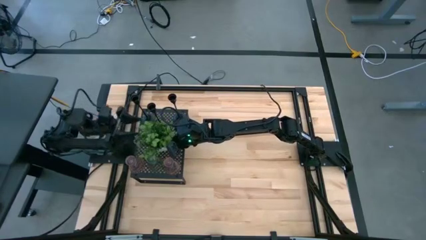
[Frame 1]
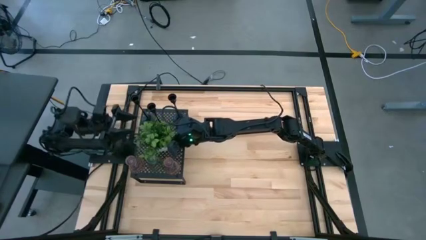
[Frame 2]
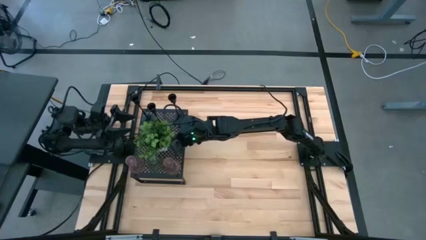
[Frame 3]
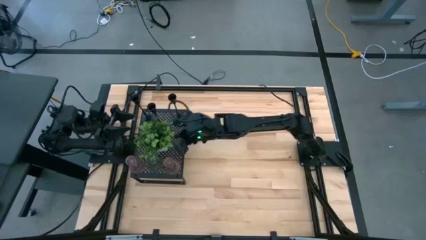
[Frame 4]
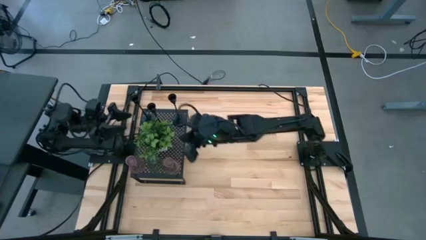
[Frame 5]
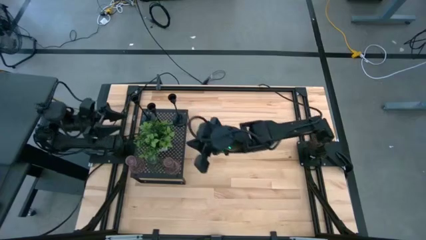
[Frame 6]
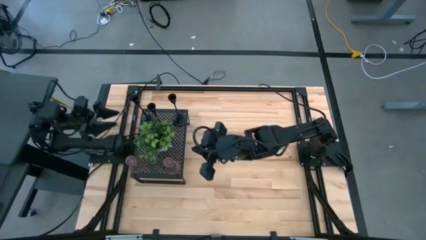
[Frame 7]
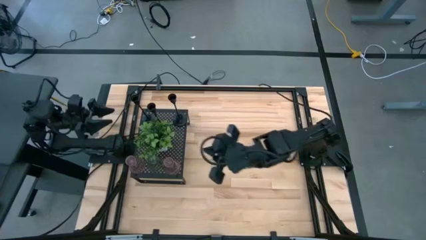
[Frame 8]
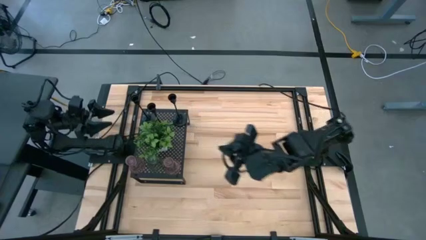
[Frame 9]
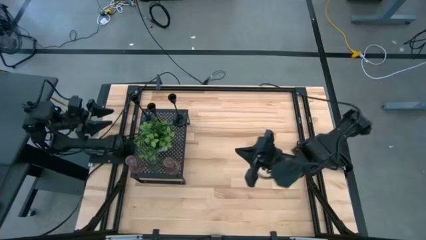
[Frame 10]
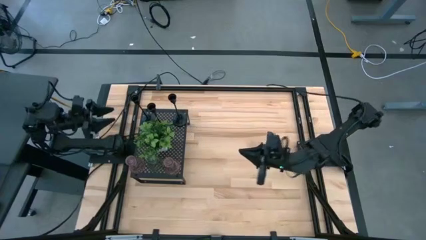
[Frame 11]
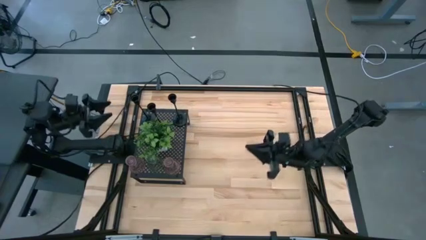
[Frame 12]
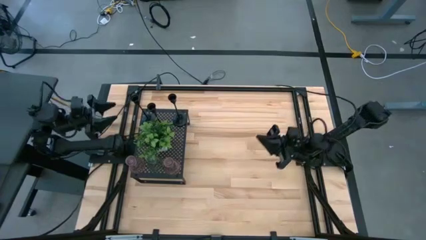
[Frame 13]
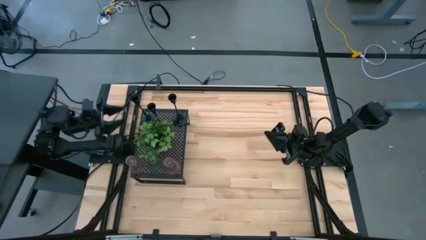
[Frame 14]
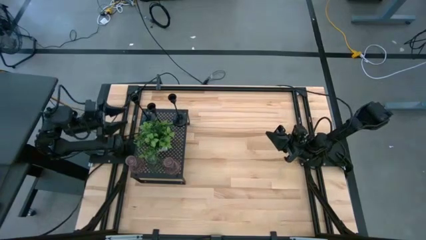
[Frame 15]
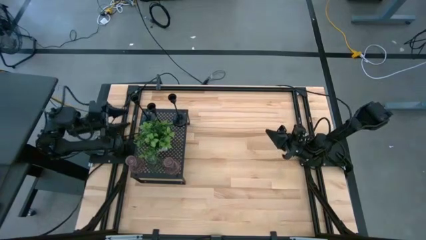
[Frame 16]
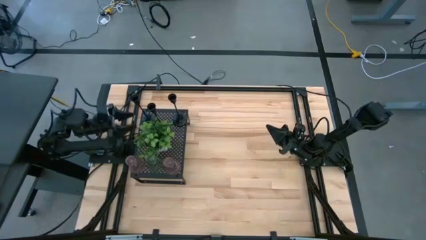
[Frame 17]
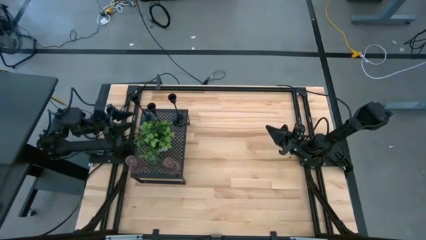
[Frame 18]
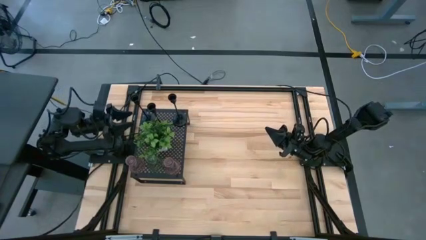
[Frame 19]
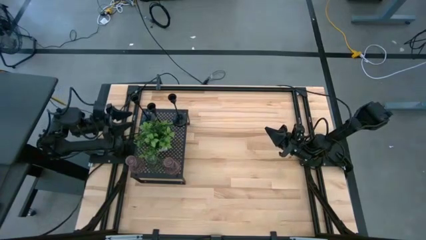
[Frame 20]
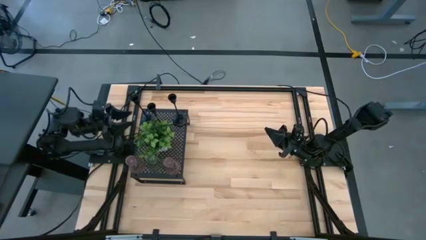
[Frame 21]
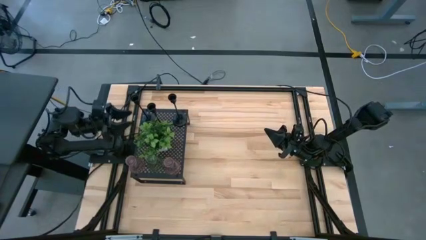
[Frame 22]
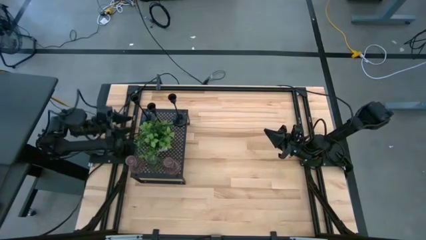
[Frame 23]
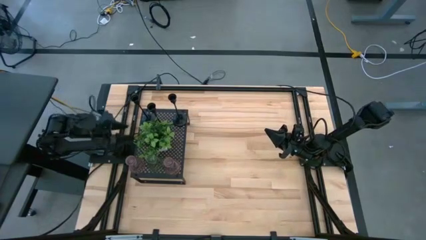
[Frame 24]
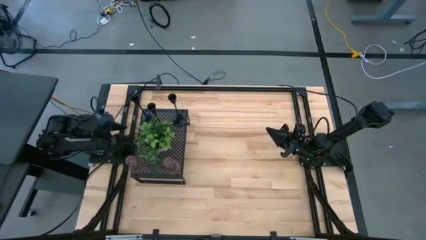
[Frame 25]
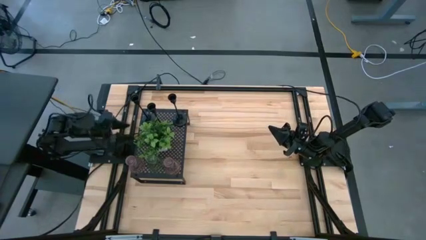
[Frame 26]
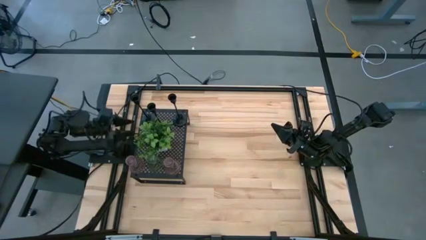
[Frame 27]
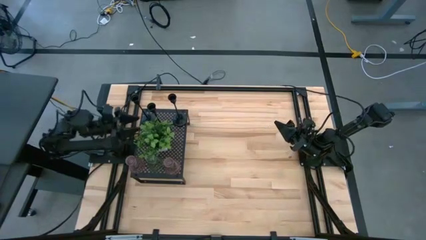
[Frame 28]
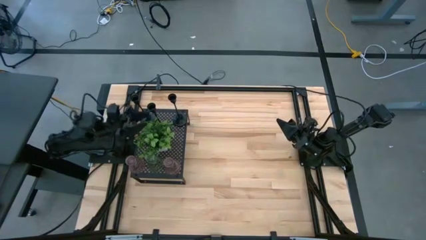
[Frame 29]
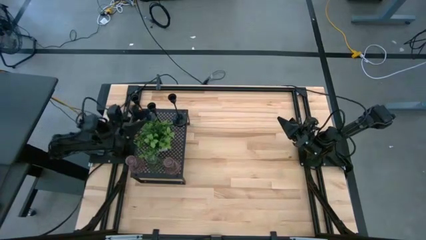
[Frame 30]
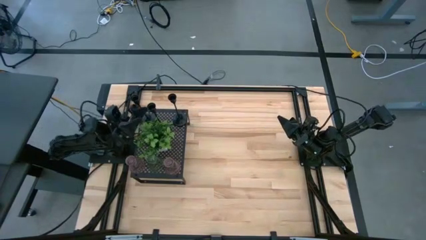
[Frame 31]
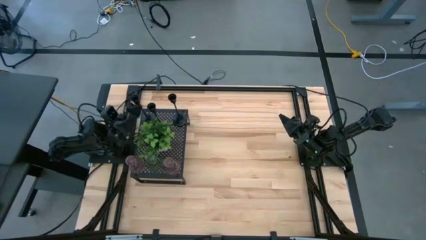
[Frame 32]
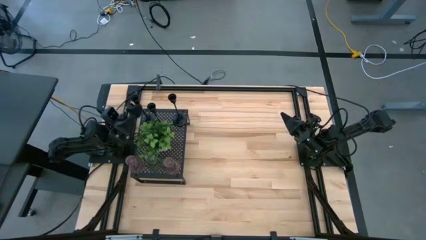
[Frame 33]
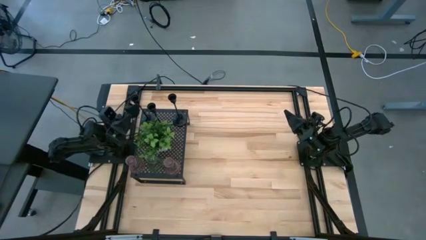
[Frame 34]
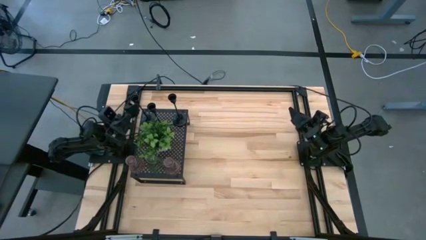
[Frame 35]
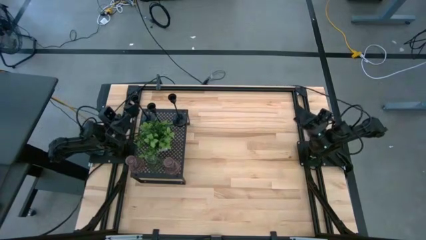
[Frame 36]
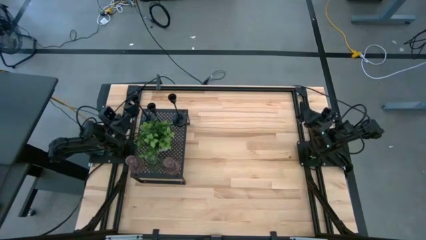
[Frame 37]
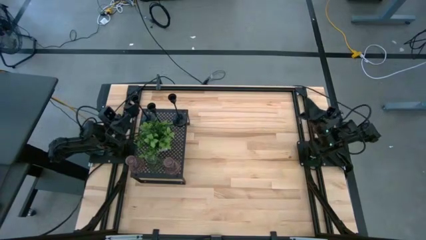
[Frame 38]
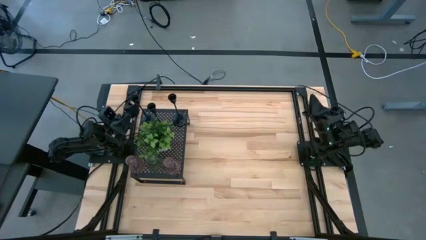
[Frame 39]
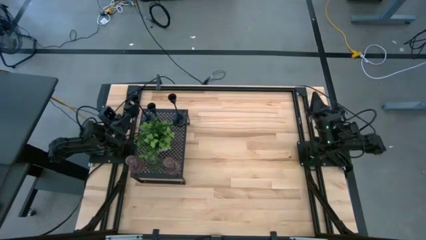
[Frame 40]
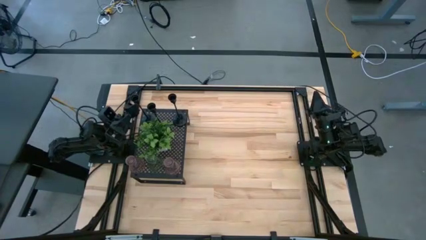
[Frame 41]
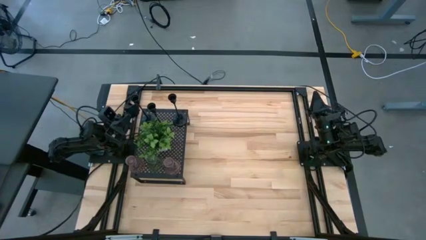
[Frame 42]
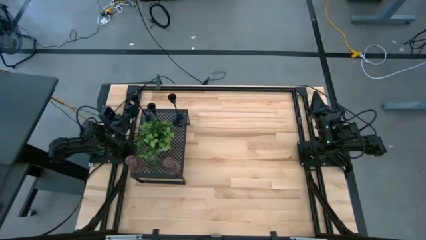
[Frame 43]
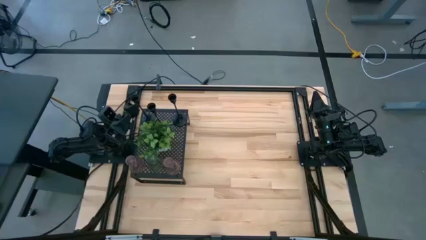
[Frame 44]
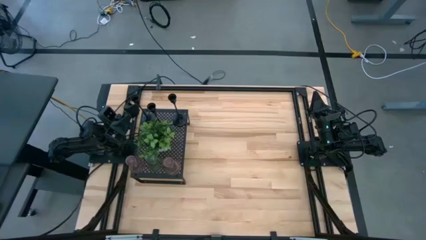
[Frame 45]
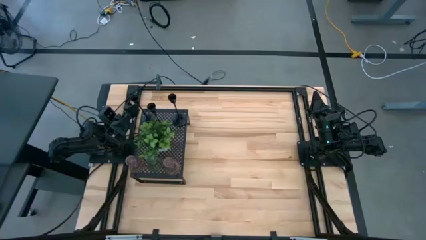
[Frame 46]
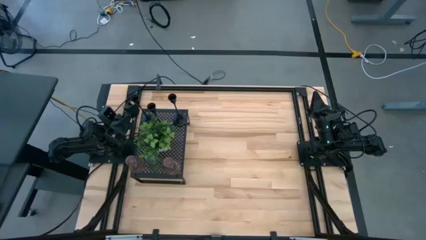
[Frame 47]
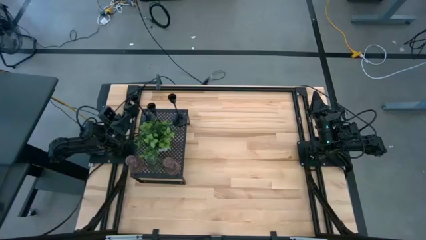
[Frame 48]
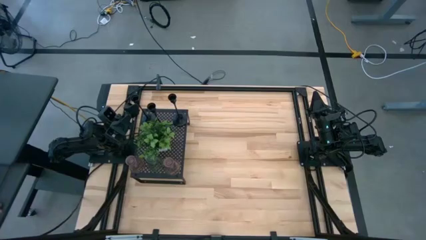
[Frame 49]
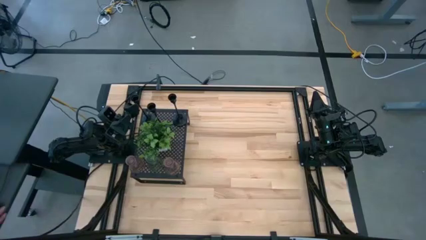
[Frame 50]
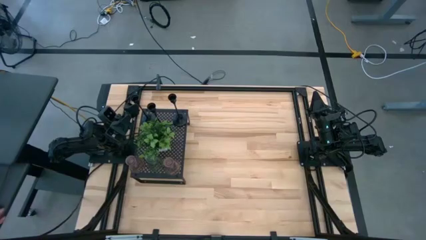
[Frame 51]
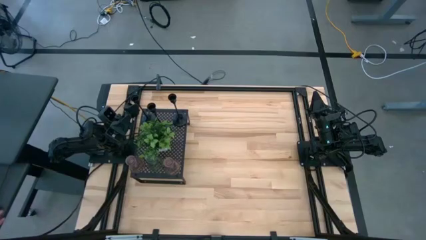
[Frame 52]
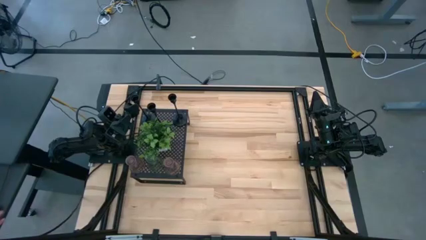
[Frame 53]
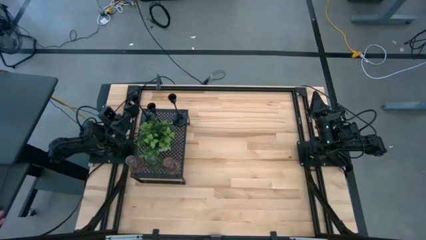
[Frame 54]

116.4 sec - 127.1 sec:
Task: Pick & Place candle stick holders
Return to Home Position

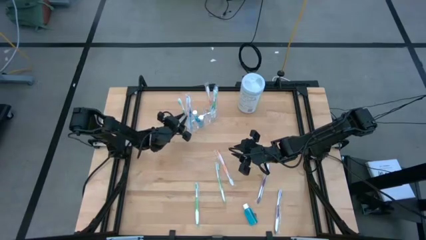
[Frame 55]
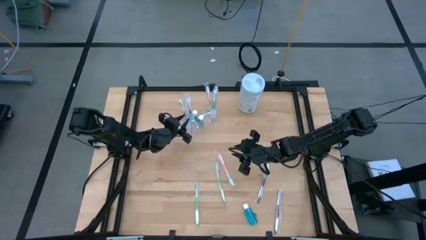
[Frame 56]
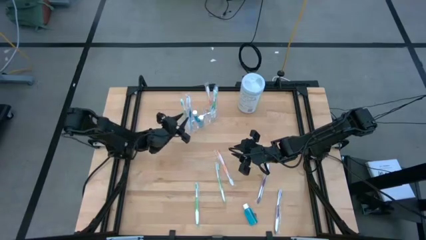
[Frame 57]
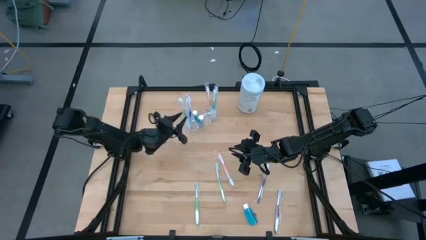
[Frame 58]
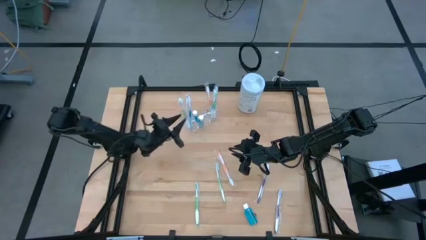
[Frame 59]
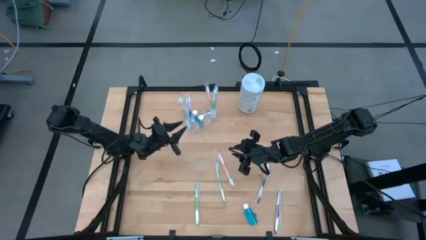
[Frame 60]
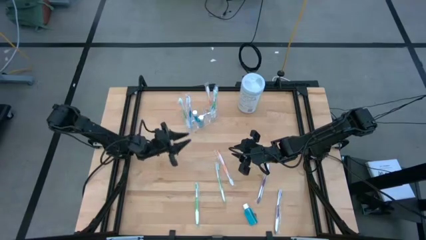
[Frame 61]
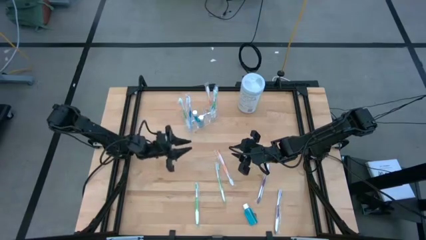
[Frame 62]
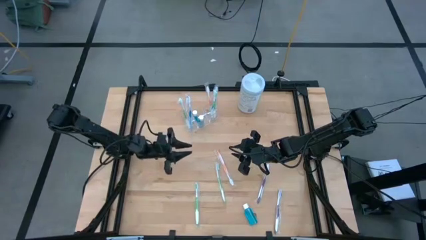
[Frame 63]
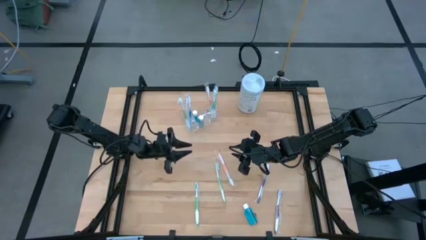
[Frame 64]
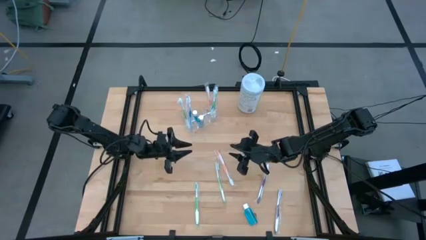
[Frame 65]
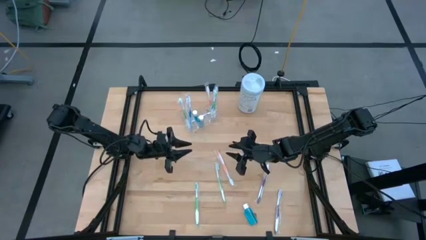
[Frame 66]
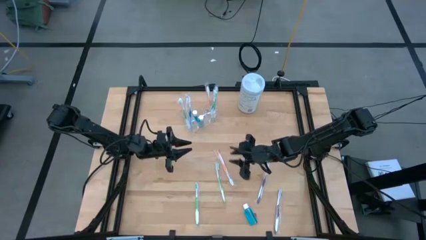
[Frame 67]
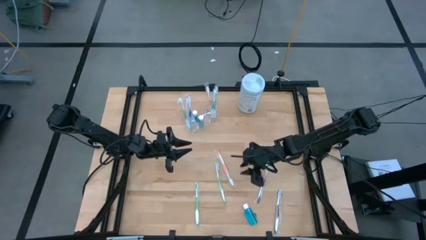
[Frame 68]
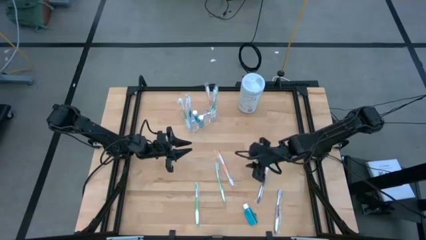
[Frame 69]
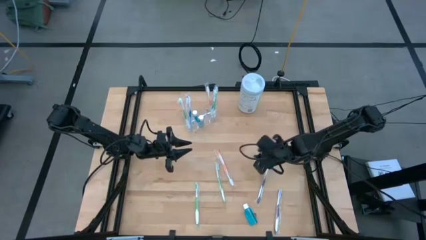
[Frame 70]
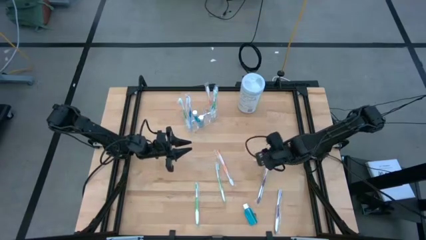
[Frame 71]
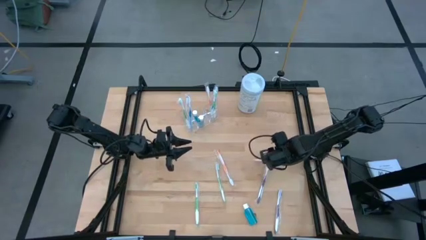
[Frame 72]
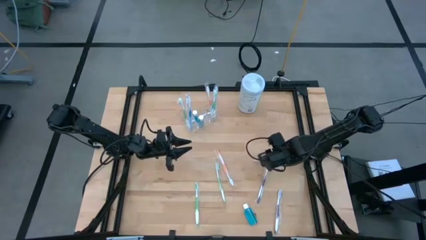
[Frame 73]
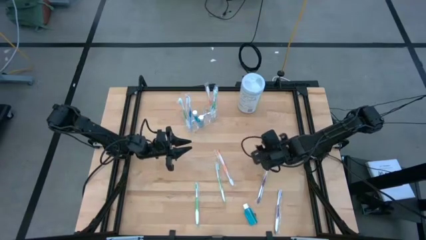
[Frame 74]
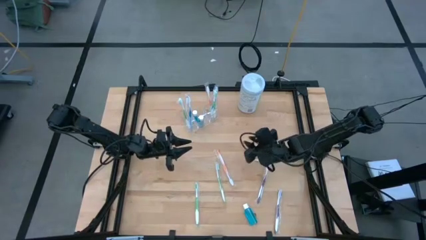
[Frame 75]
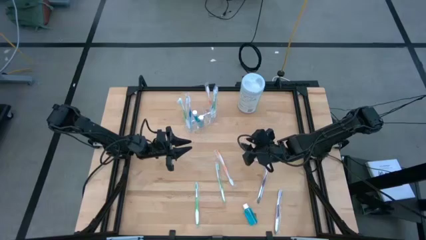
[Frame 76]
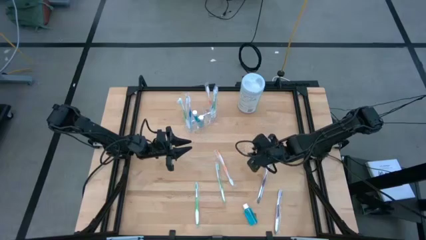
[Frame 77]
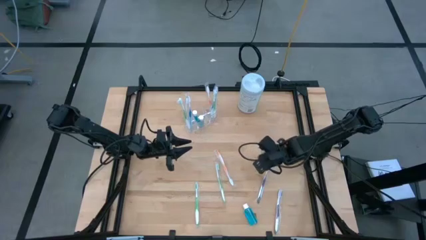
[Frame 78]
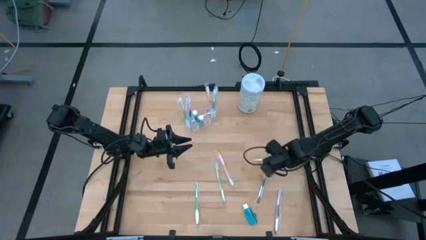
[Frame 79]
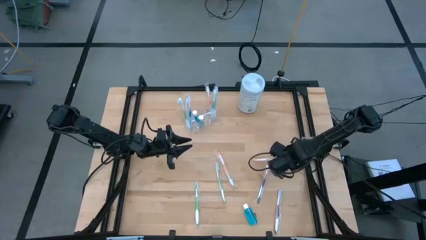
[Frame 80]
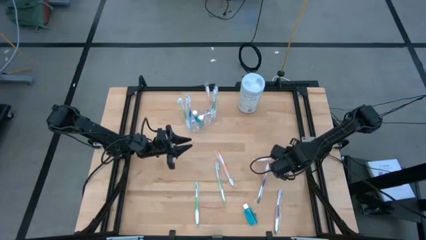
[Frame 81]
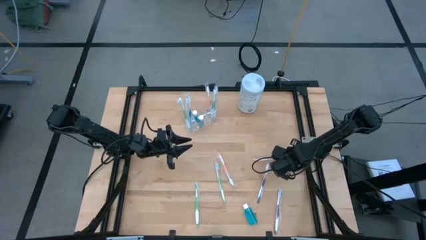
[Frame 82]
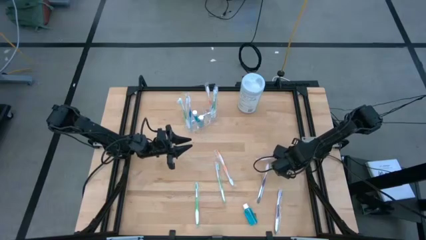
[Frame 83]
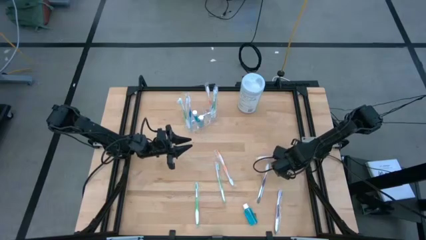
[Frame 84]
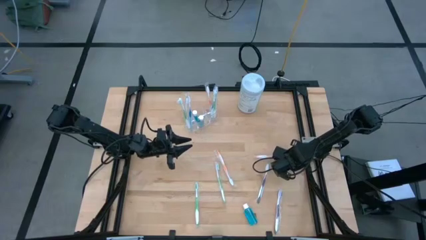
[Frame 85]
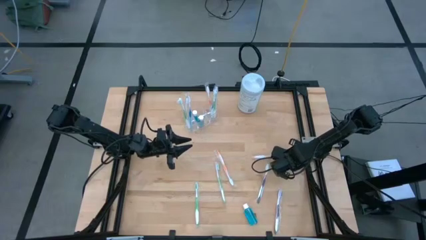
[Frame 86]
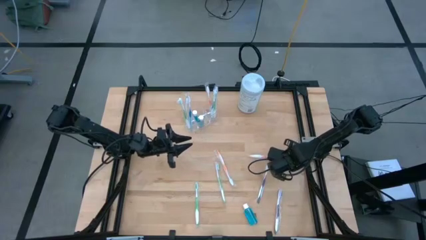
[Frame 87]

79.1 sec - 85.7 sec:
Task: Pick & Place toothbrushing station
Put the orange toothbrush into the transparent organizer
